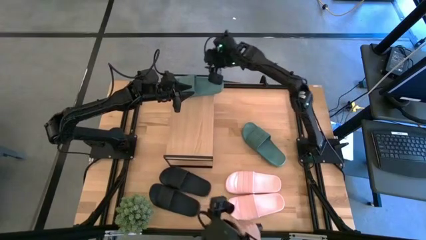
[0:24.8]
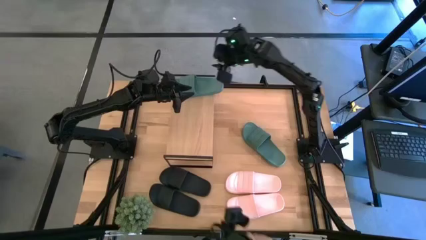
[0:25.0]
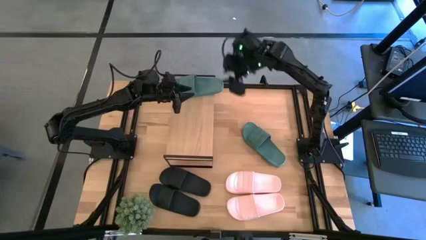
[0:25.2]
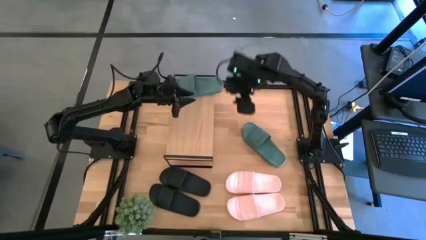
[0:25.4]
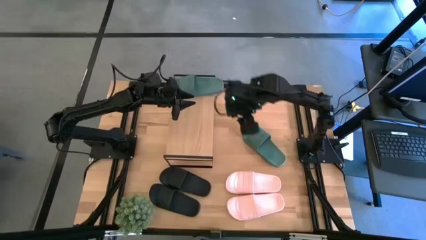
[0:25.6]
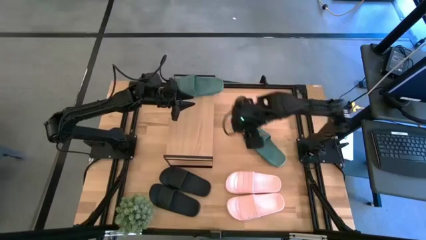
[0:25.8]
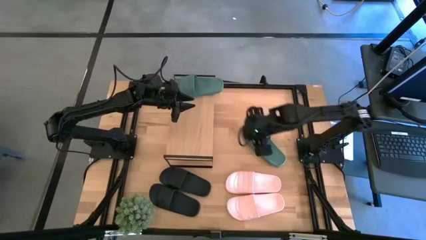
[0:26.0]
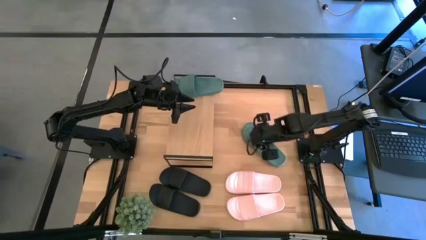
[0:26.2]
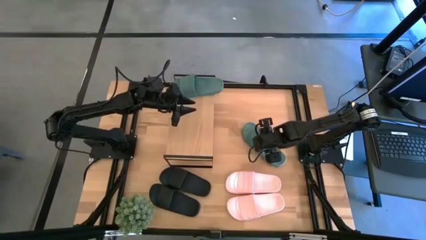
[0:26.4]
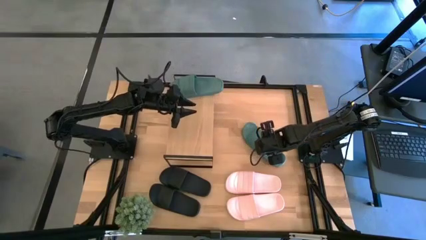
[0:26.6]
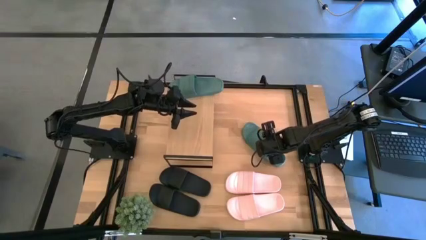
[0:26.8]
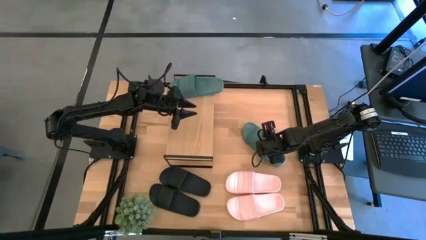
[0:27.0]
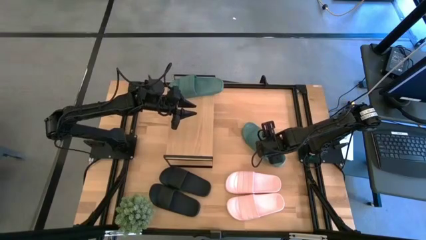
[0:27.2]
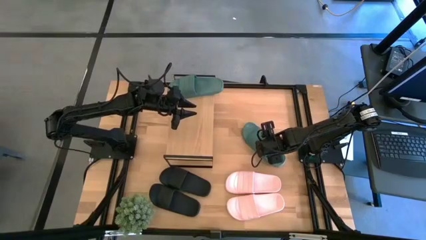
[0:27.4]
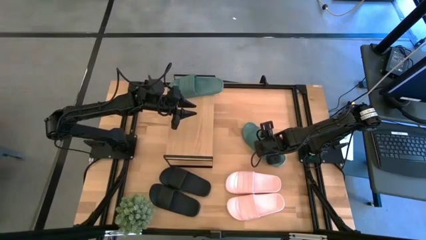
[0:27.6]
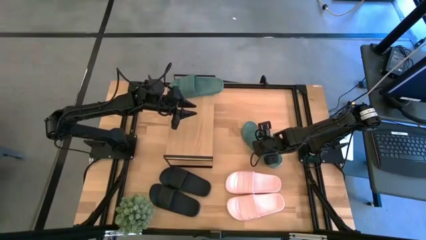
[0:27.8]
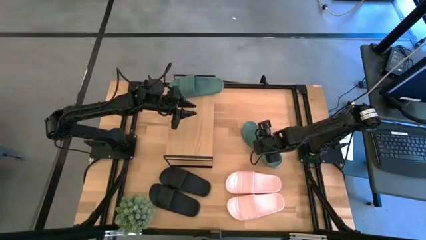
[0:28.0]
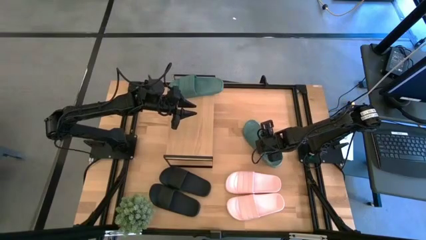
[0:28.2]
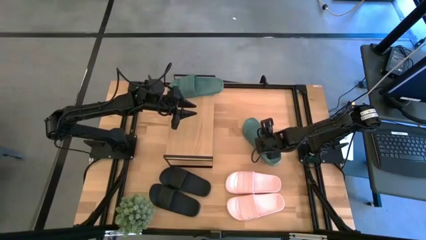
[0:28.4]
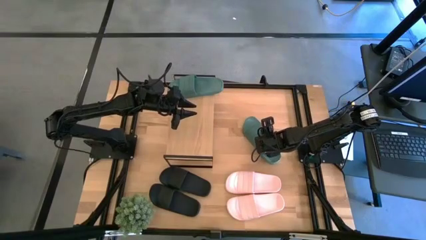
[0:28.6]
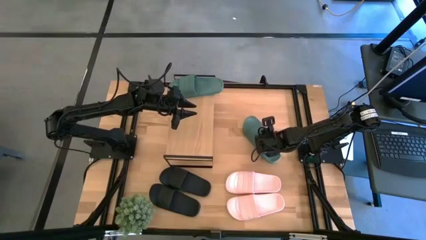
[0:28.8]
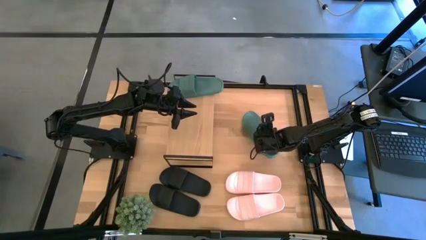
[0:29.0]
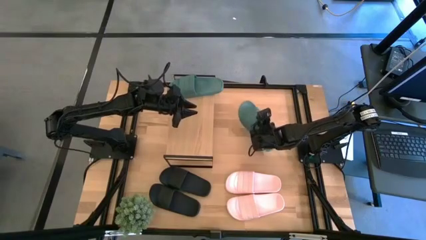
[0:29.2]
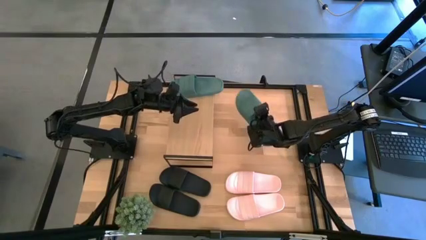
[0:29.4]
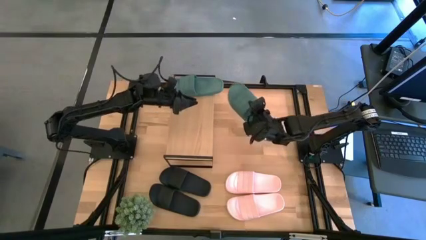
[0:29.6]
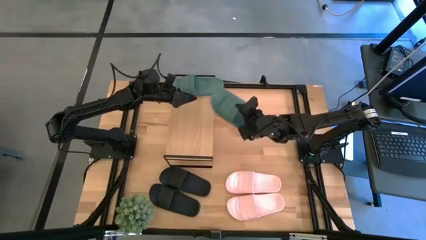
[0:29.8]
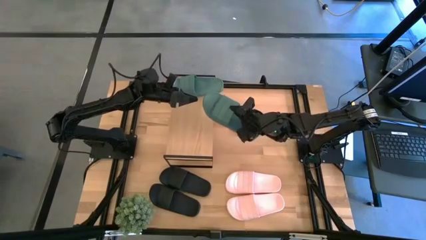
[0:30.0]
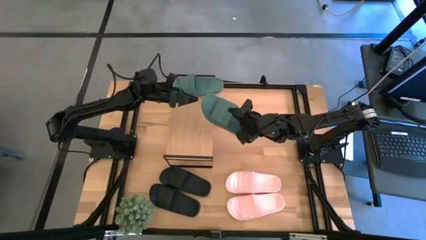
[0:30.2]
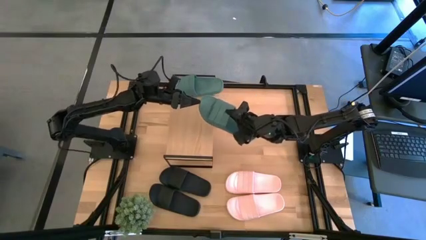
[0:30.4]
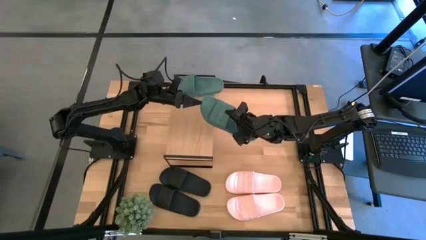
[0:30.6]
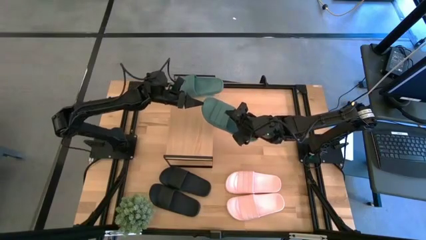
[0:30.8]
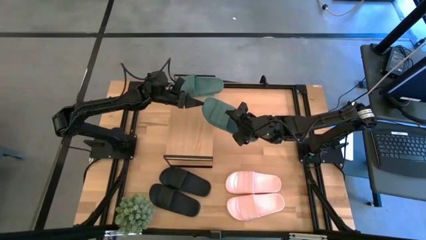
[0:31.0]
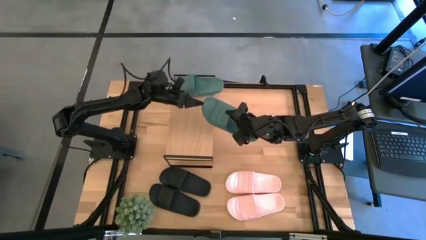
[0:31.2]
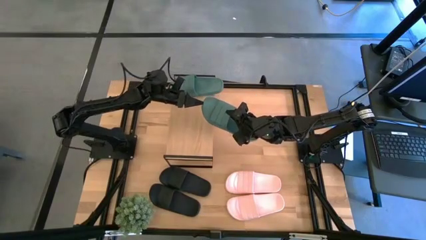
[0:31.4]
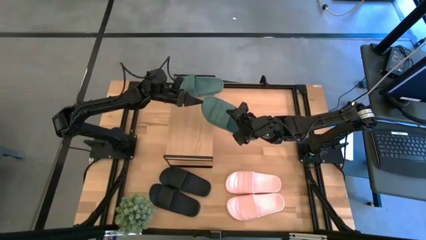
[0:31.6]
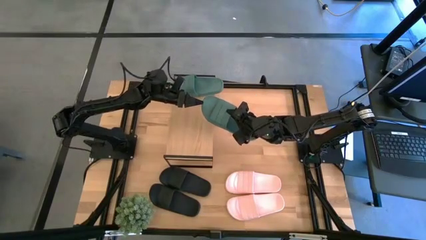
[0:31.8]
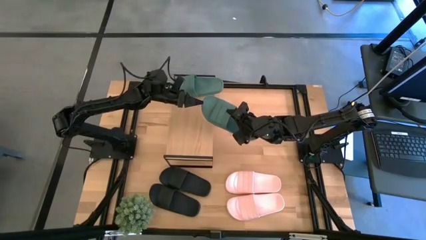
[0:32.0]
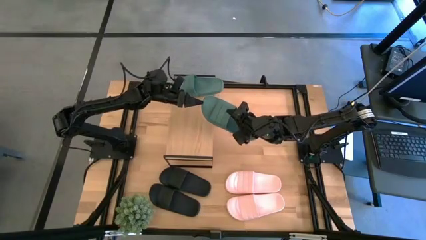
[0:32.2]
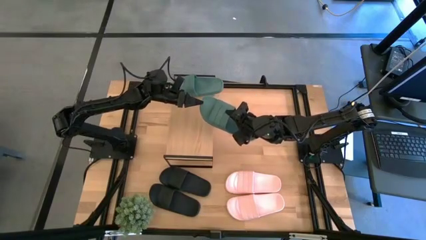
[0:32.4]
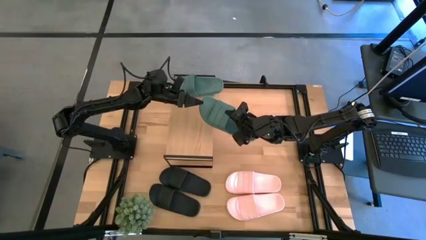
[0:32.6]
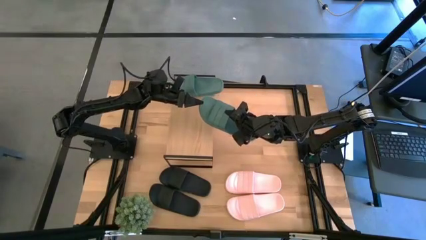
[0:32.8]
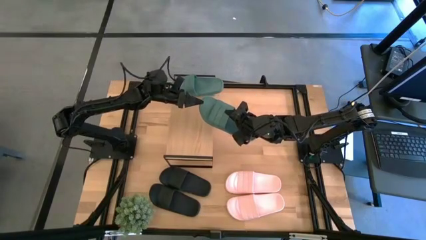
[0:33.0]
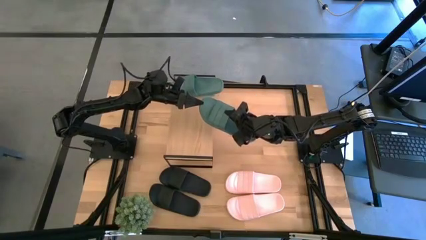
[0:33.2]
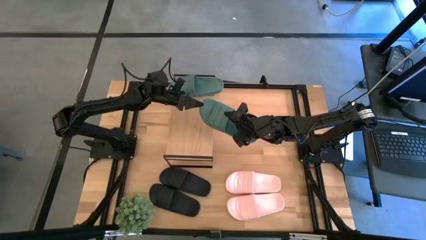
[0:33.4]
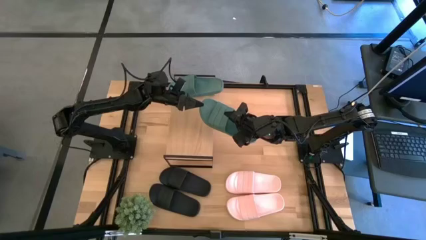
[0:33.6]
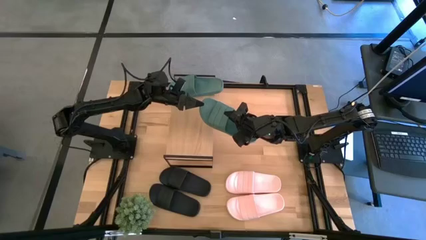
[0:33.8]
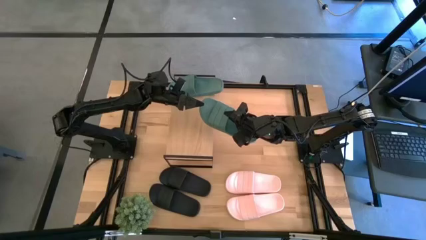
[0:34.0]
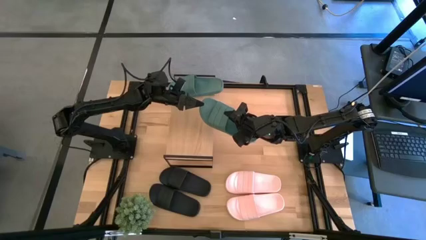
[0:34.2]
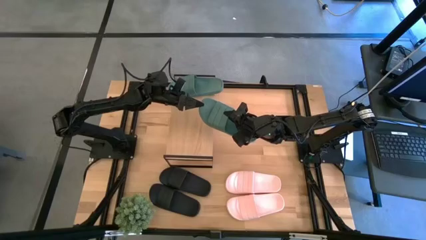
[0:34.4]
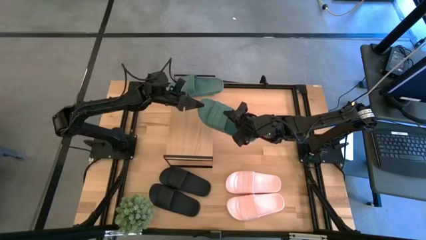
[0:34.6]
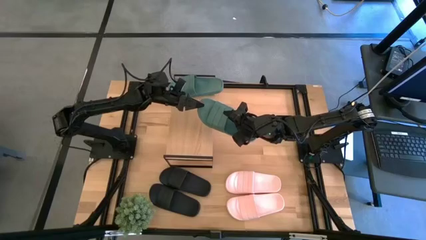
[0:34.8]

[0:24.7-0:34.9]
Task: Pick and place slides into the shelf
Put the green slipper on the shelf
